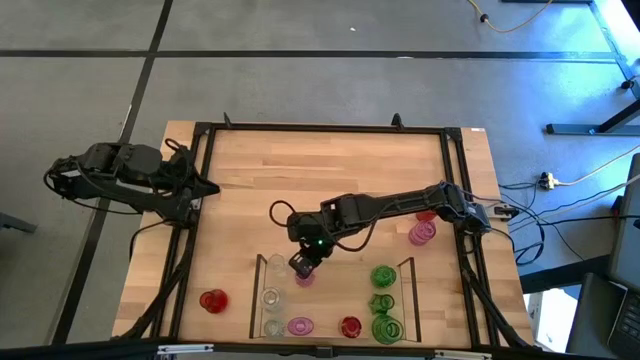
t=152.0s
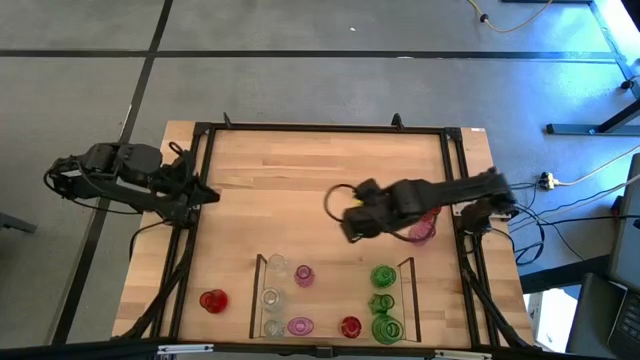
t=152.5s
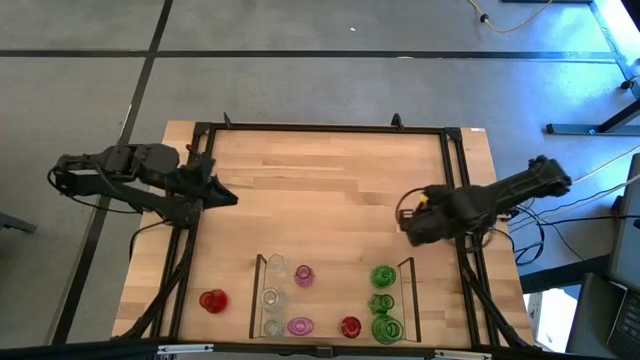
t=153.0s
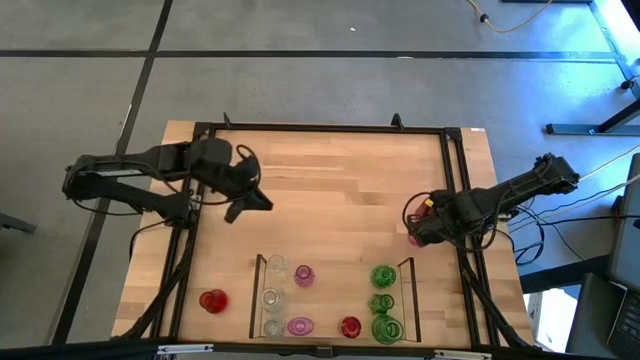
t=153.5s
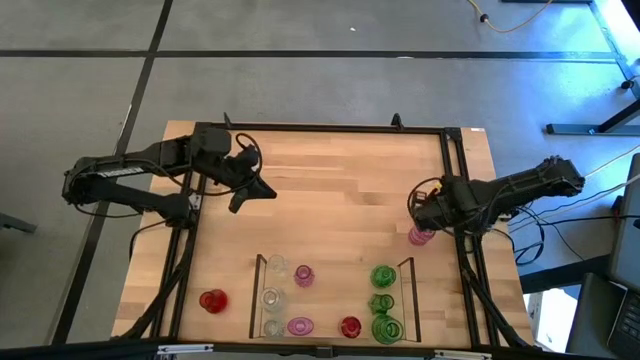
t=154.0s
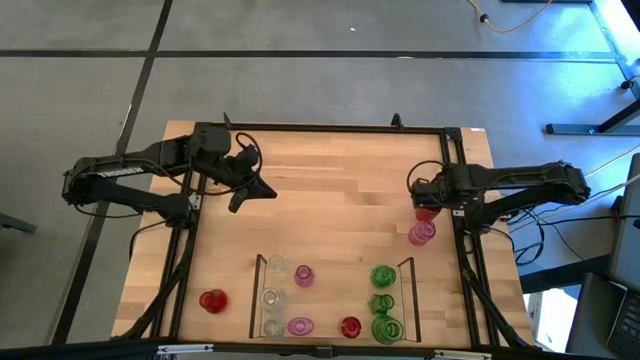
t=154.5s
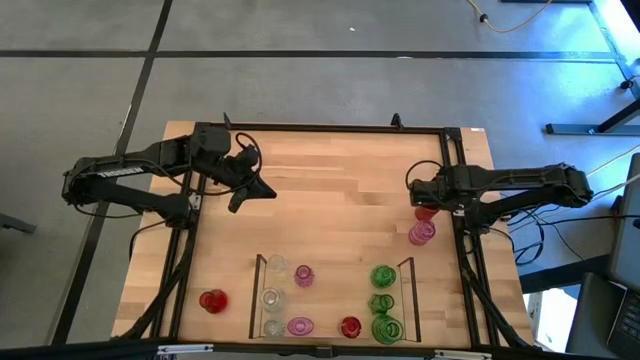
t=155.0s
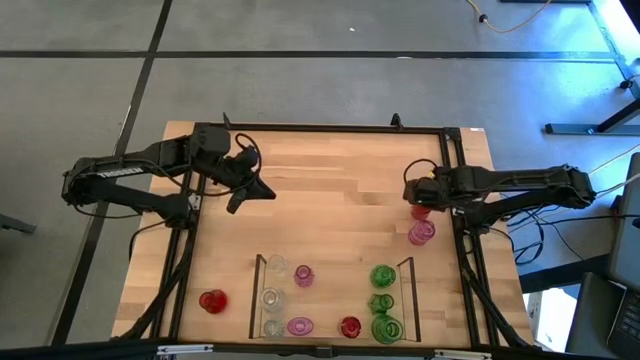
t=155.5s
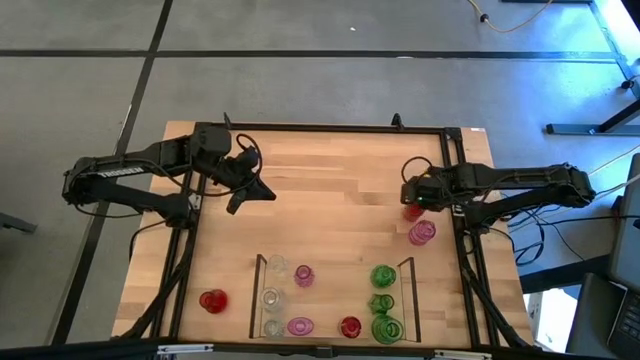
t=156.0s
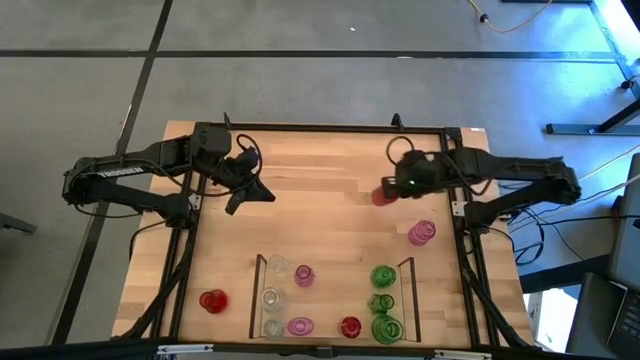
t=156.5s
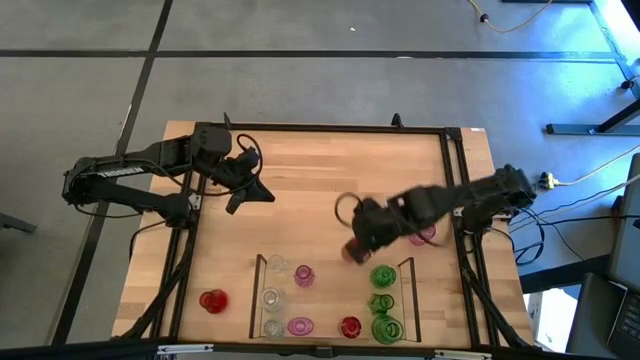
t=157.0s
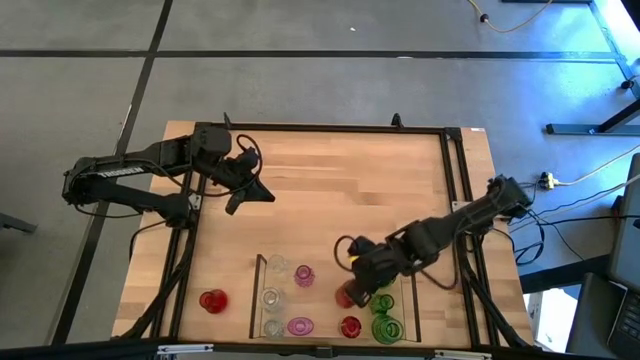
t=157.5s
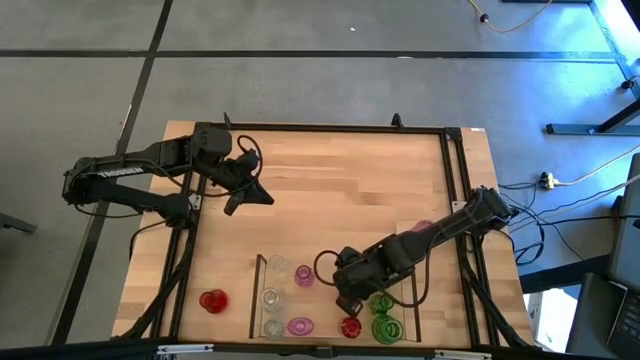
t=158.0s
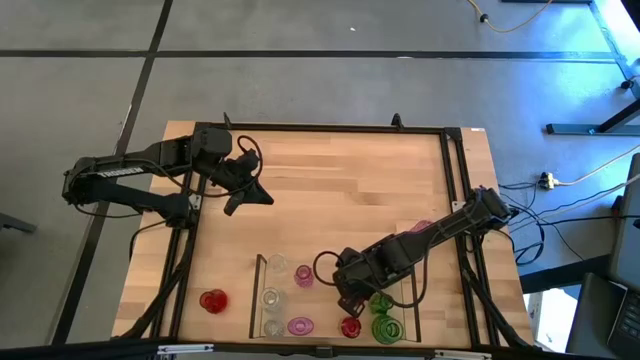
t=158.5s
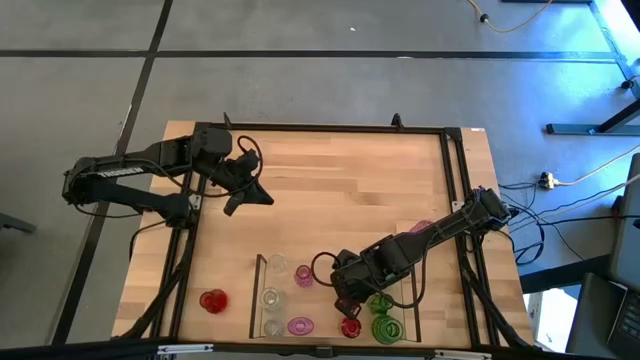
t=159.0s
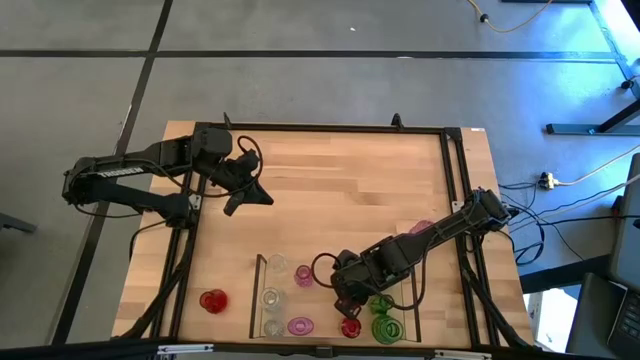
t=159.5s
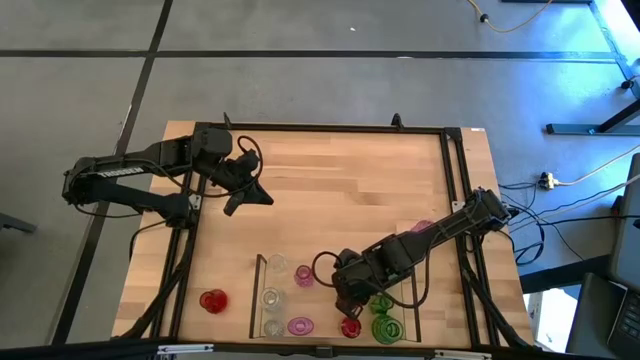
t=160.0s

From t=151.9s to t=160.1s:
Task: sort vases onto shelf
Put the top red vase aligned with the other red vases on the shelf

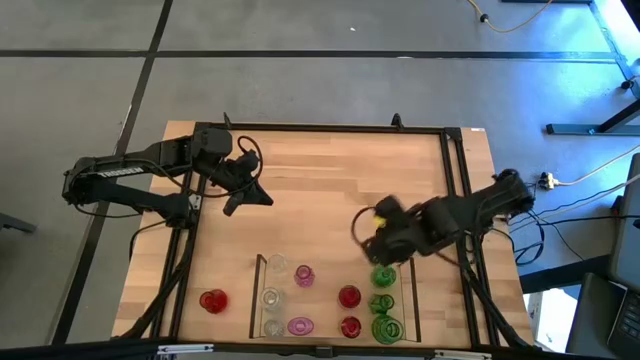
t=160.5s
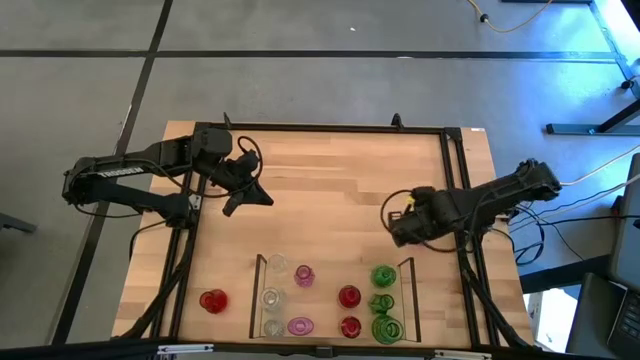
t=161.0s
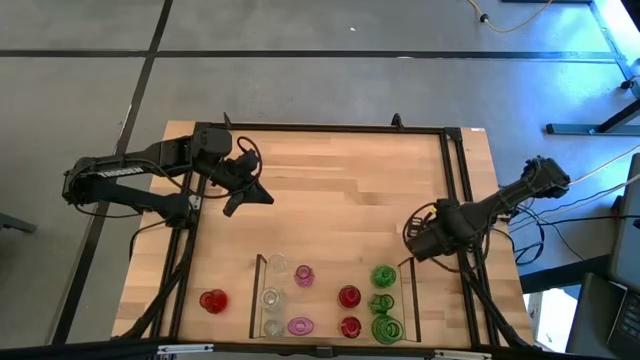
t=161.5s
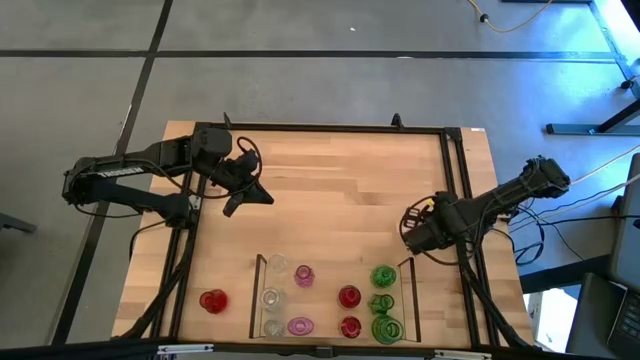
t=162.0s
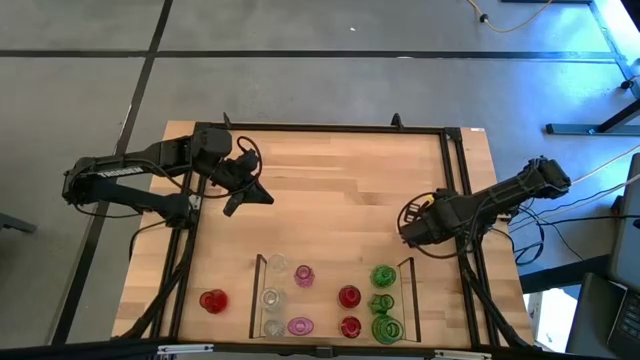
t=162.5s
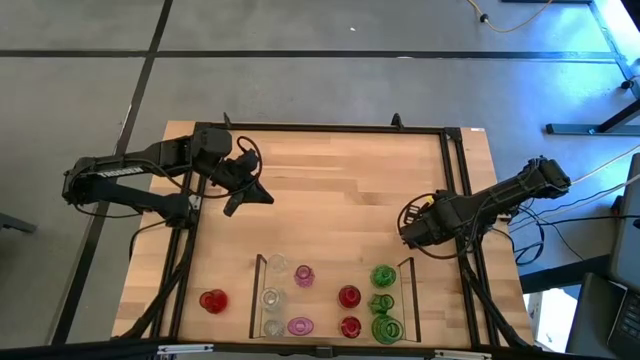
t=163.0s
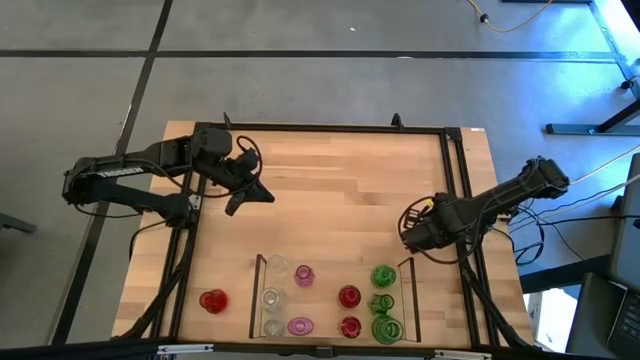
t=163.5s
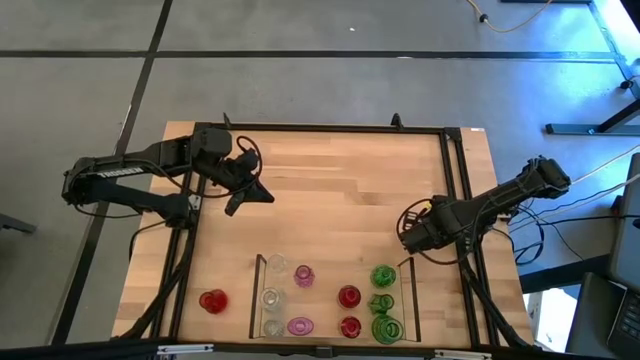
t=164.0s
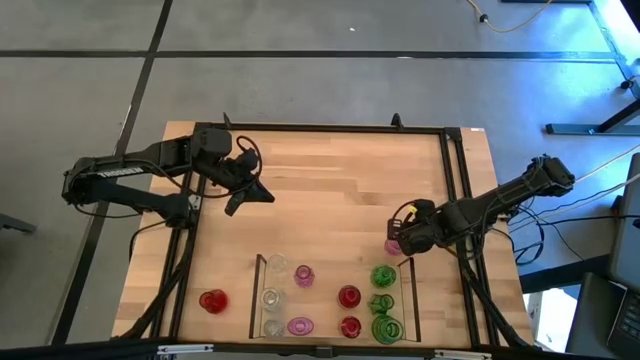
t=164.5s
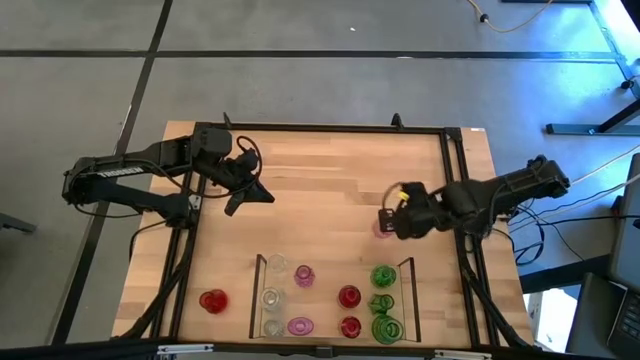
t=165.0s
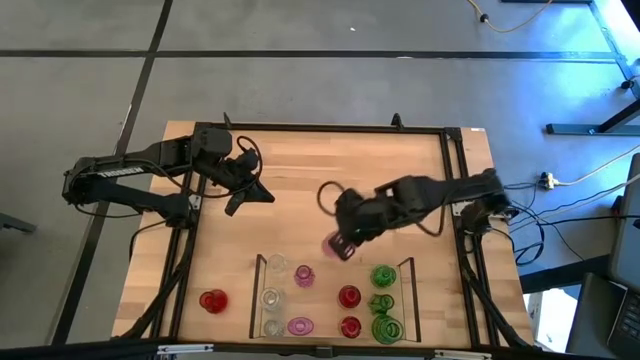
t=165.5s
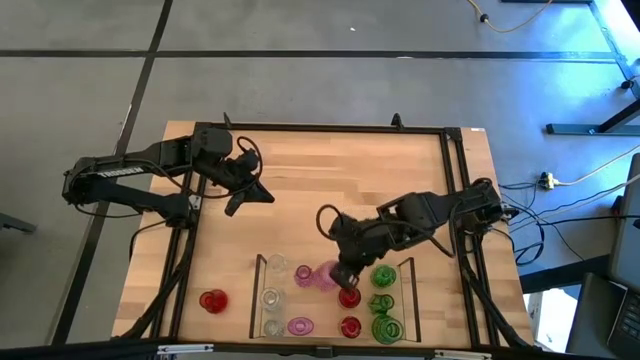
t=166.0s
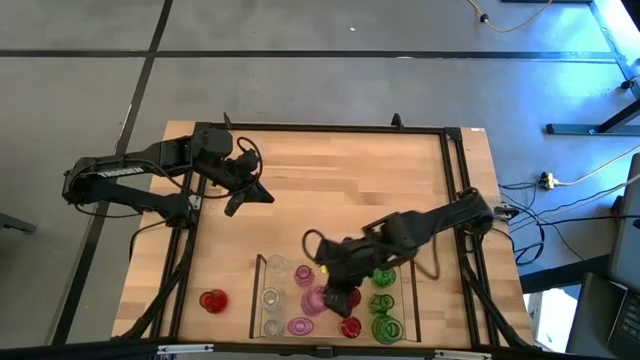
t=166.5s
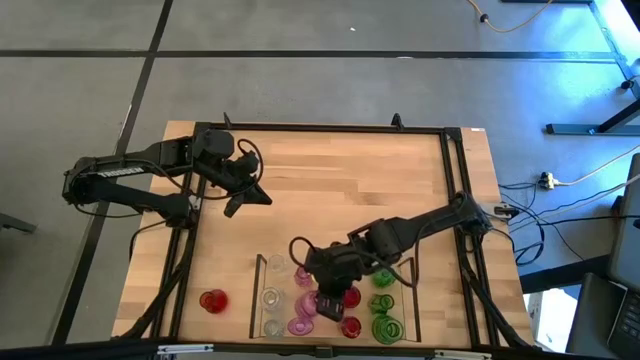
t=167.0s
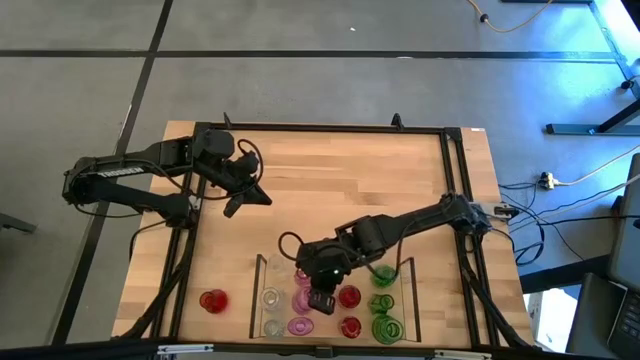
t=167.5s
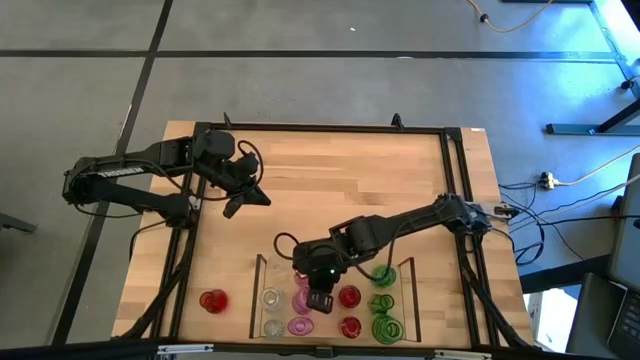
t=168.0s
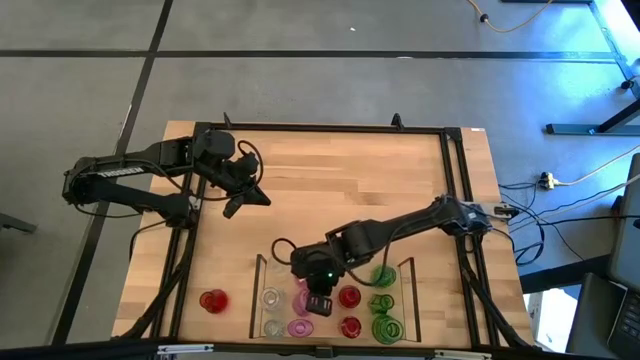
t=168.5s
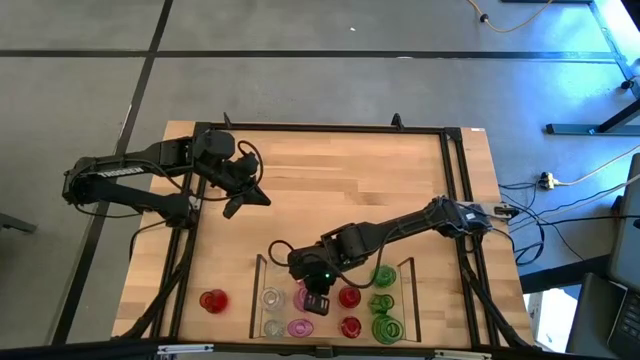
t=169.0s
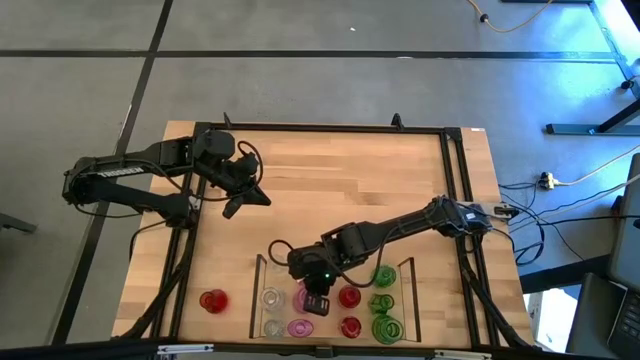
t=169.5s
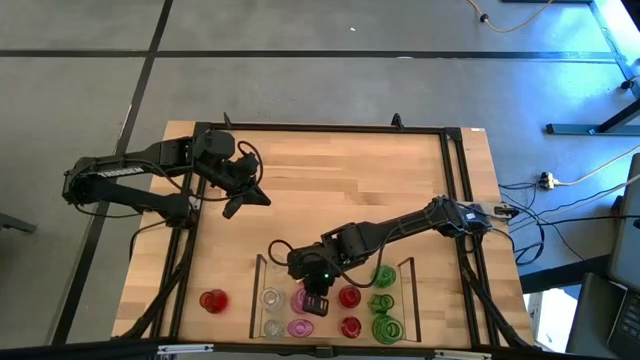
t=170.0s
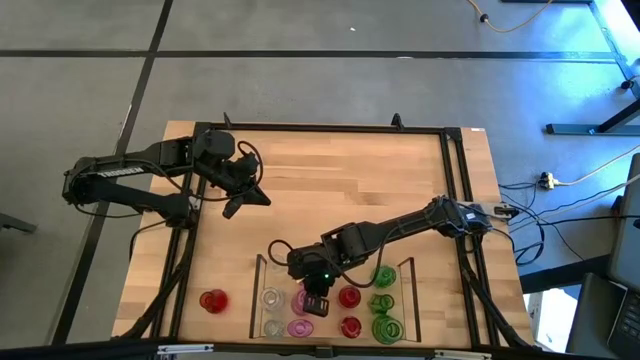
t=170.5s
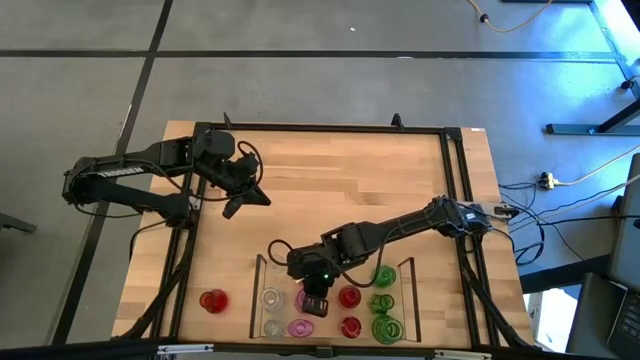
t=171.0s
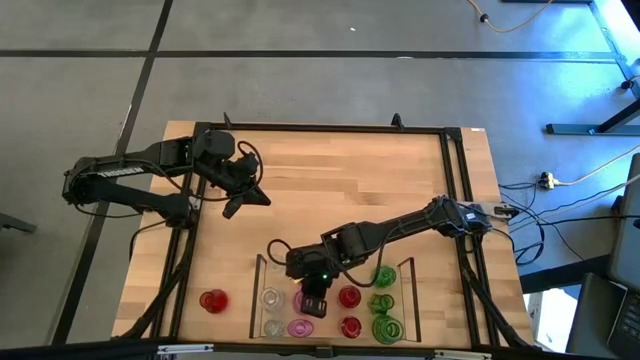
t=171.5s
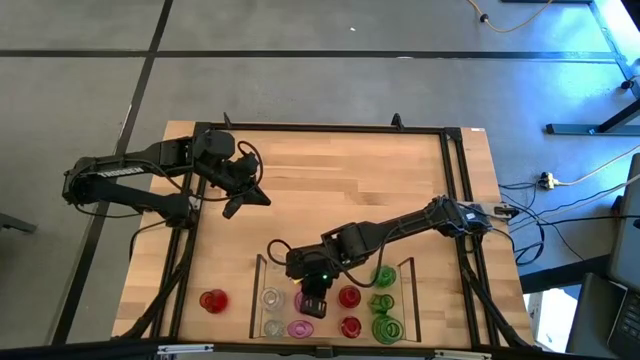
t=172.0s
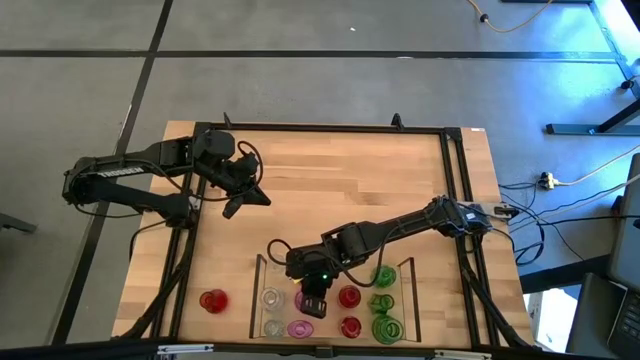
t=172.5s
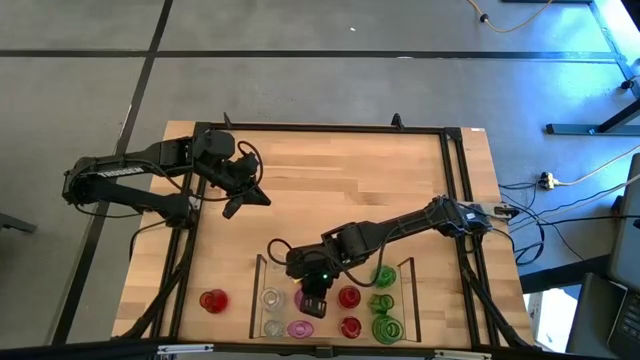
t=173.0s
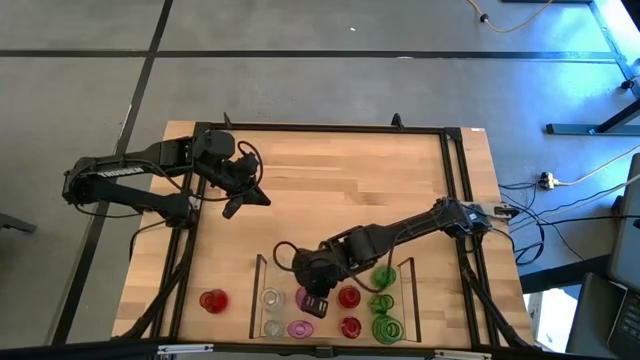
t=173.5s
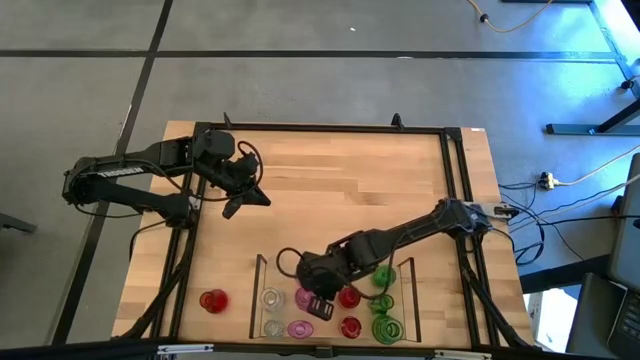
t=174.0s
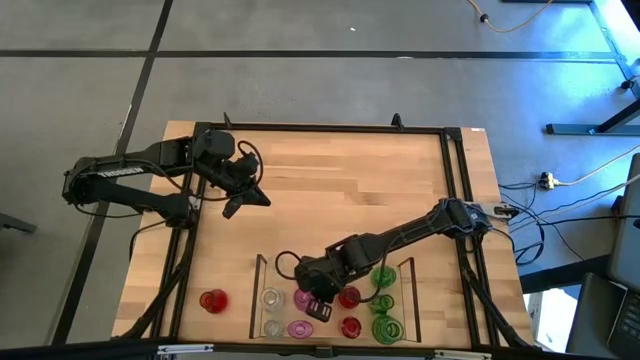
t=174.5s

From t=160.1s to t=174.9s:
Put the purple vase aligned with the other purple vases on the shelf
